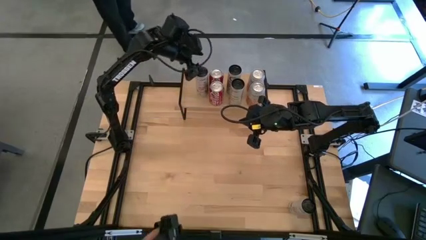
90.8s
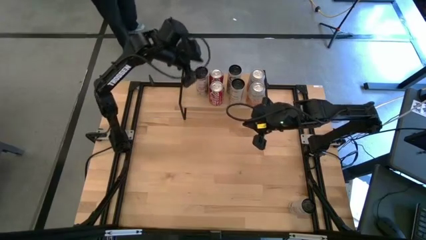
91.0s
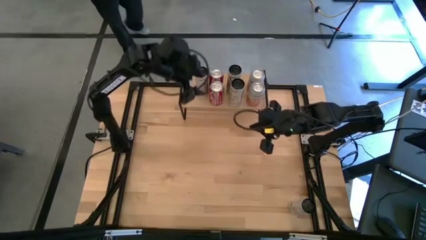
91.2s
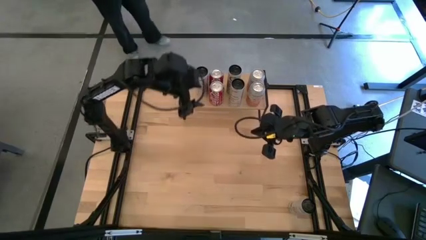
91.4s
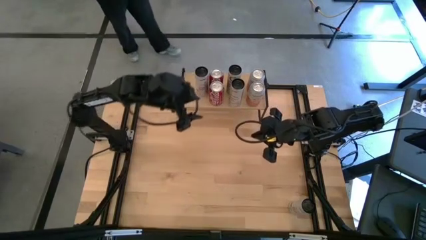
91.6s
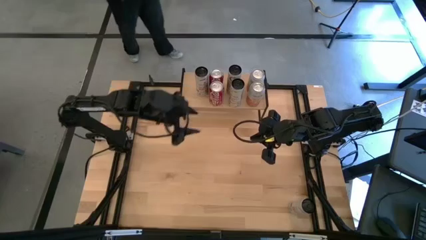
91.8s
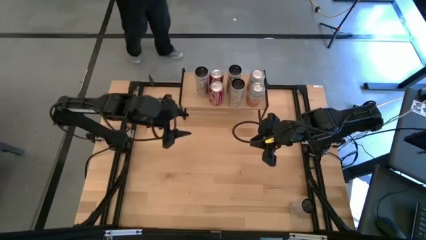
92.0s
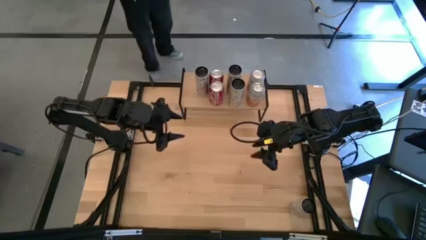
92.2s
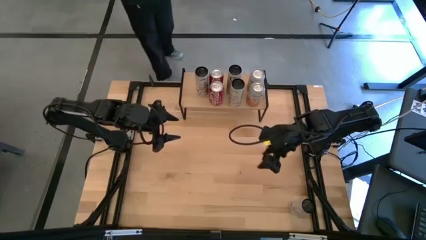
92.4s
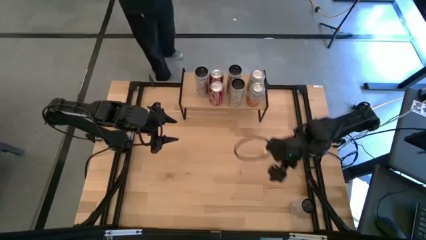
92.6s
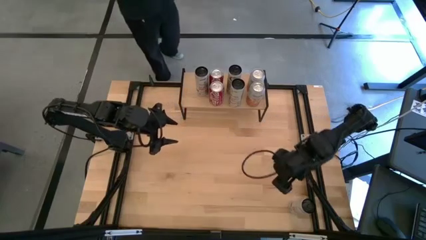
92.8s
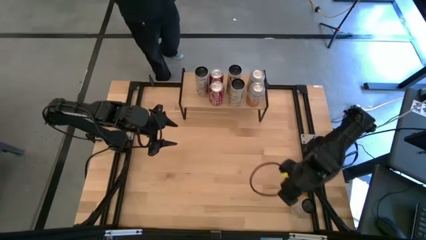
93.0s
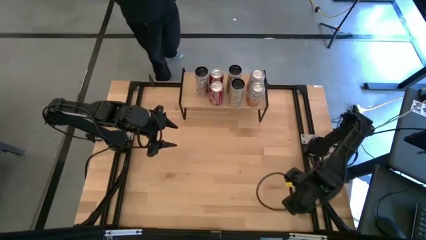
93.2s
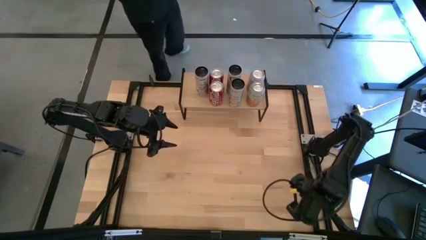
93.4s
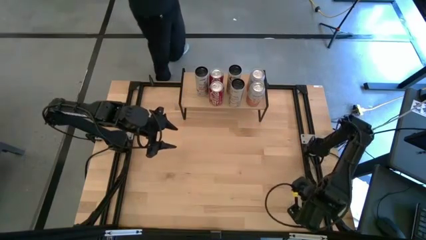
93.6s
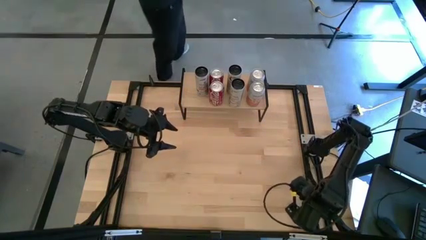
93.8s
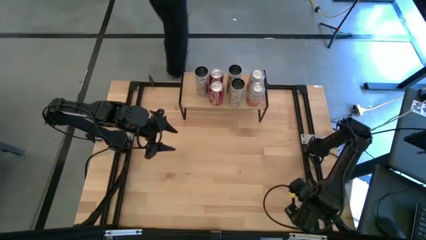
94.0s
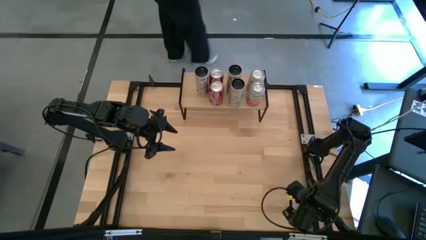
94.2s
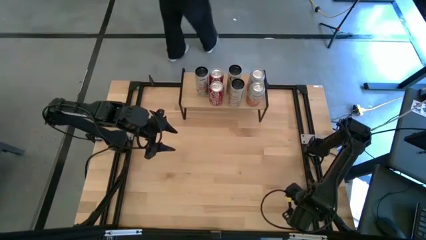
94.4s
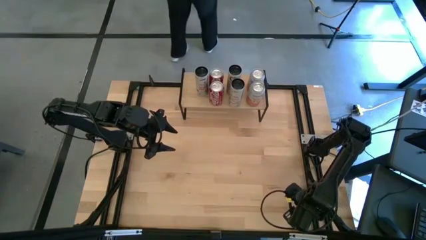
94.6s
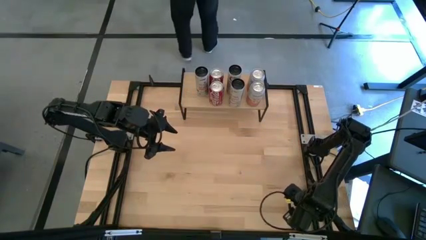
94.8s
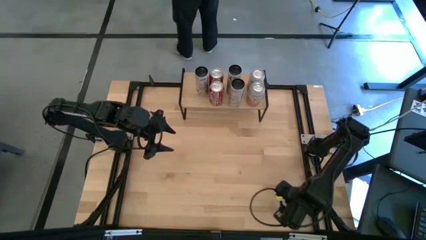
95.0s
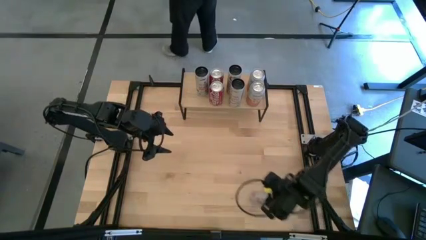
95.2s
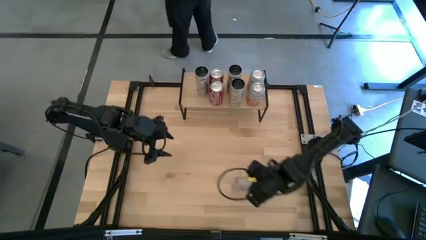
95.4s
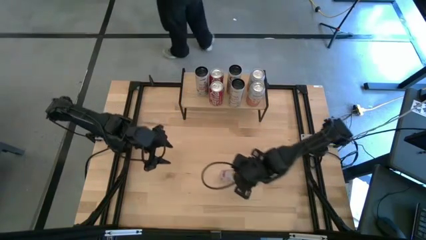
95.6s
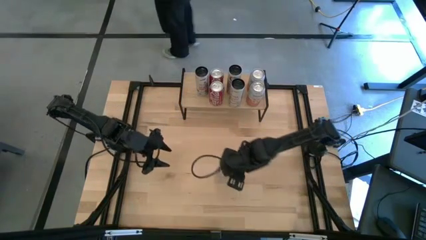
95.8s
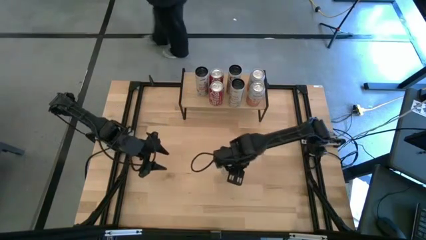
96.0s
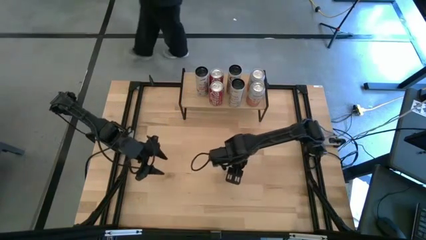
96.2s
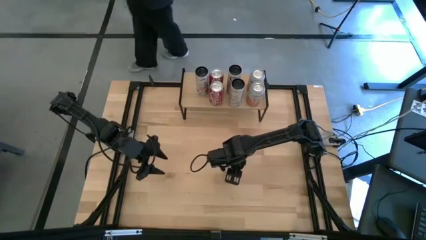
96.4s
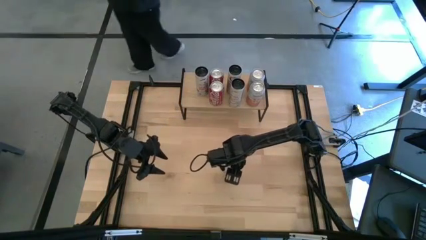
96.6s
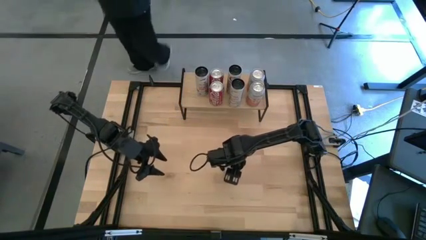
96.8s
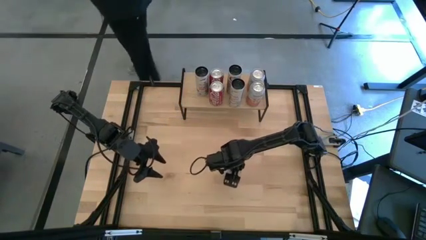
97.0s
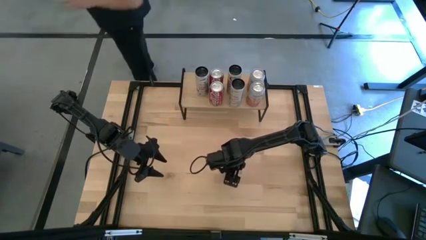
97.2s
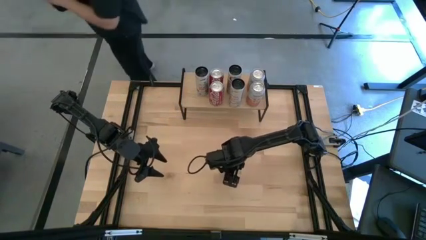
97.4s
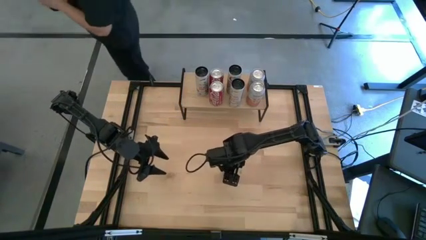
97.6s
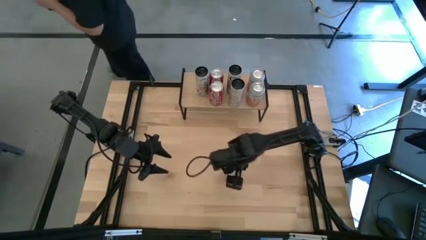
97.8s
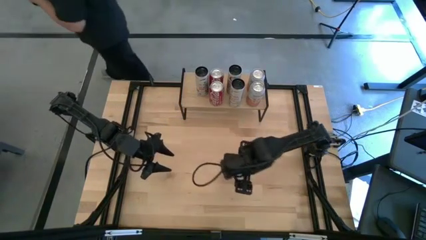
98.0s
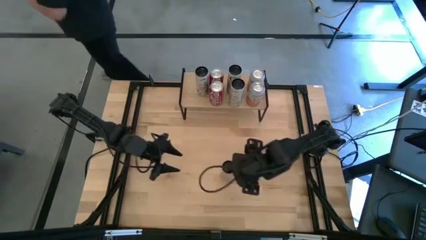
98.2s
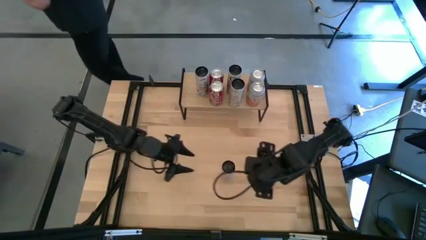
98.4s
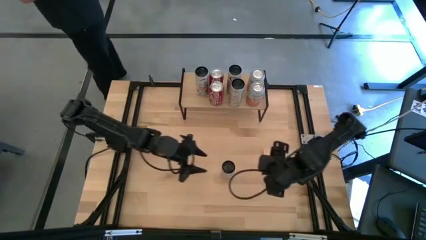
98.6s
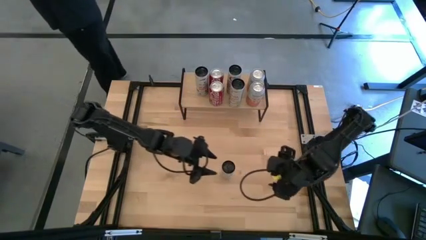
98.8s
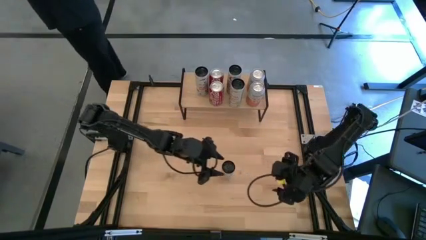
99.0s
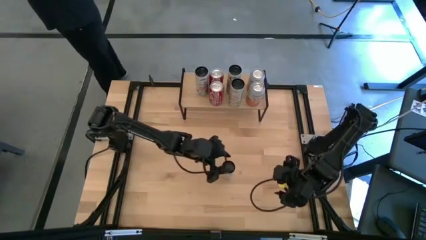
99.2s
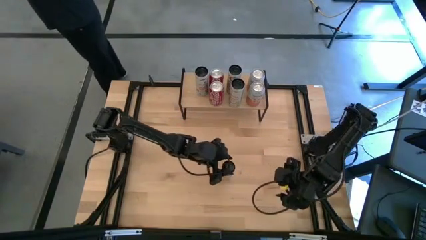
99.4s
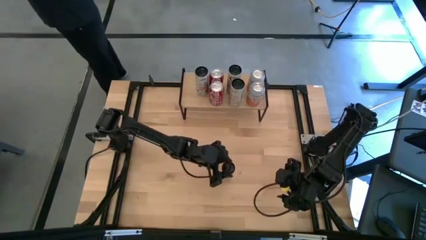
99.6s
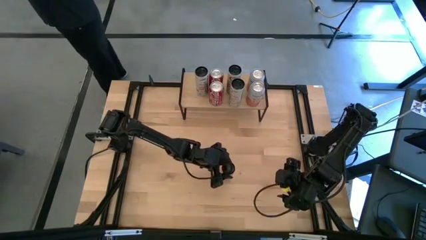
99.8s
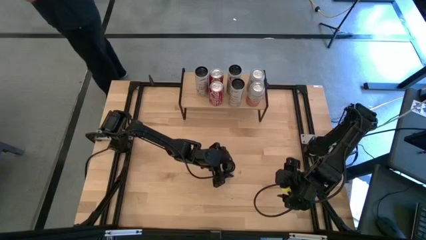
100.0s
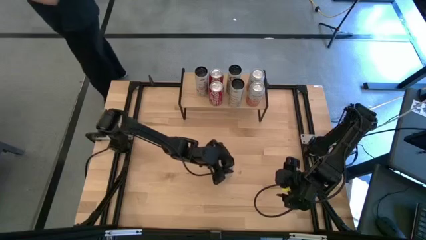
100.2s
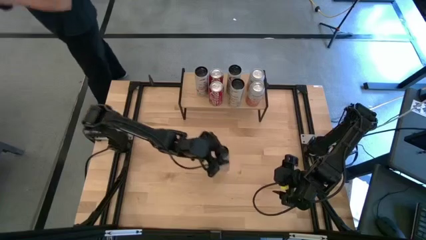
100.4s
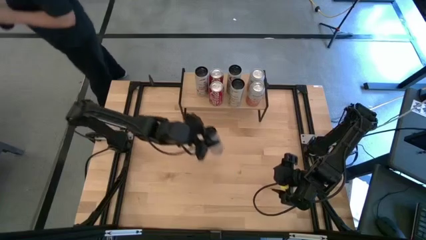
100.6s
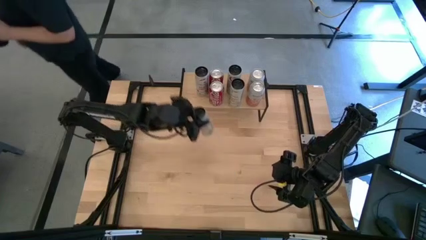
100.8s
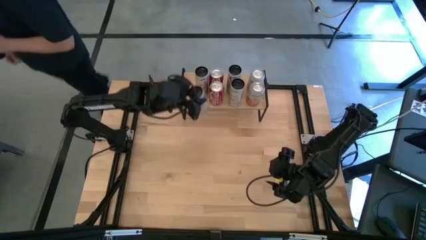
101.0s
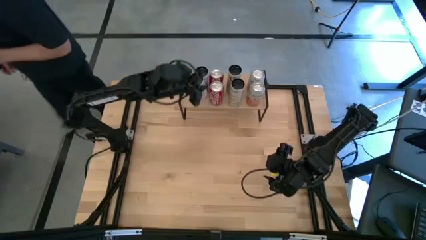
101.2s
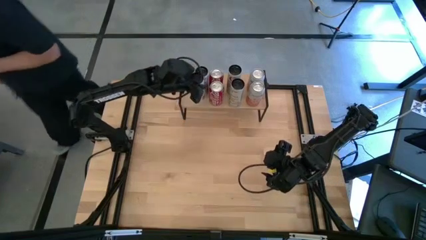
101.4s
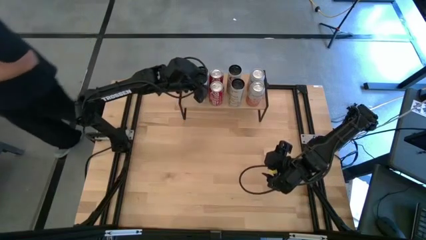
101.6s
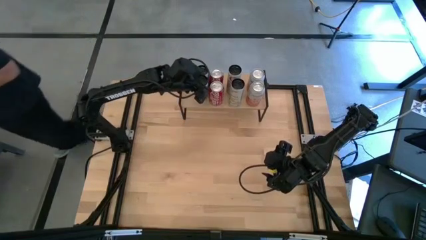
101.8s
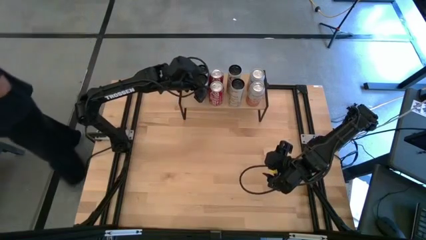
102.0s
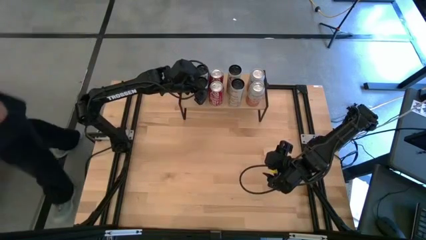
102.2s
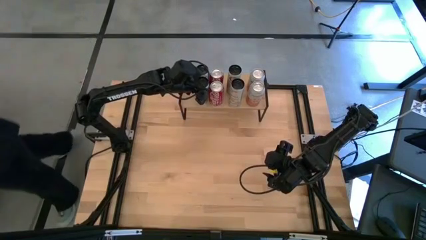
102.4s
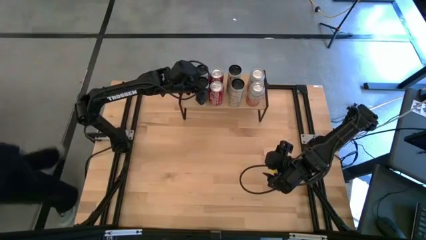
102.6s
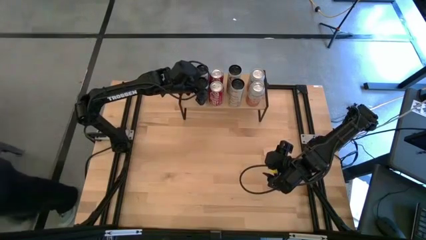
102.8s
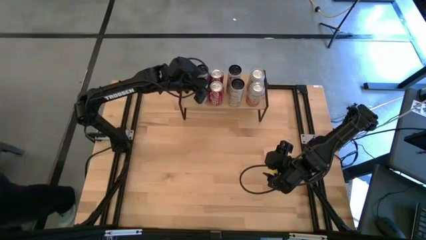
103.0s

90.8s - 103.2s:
Task: Place canned beverage on shelf
Put the white and pink soda can on the shelf

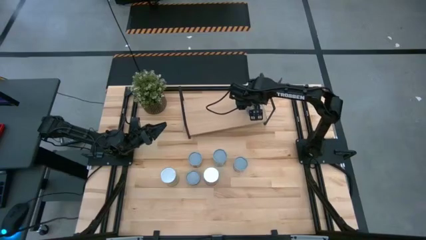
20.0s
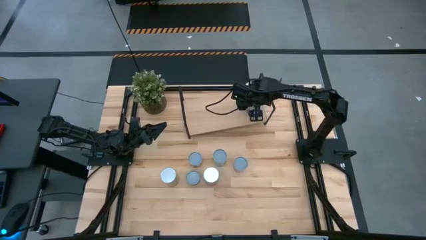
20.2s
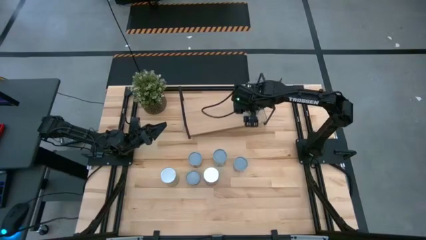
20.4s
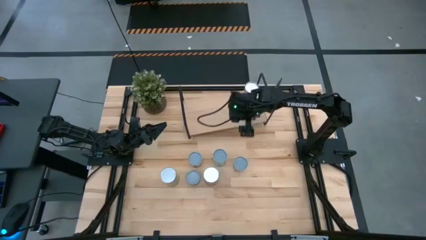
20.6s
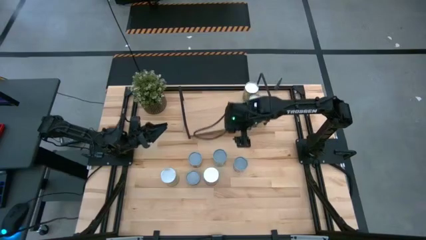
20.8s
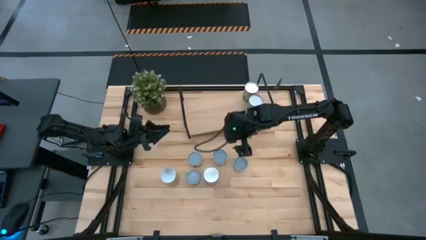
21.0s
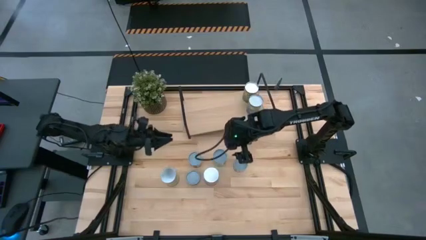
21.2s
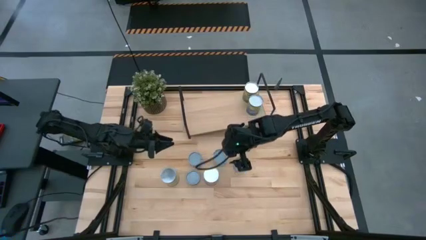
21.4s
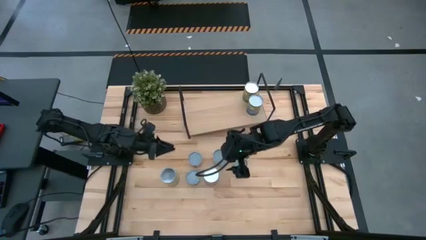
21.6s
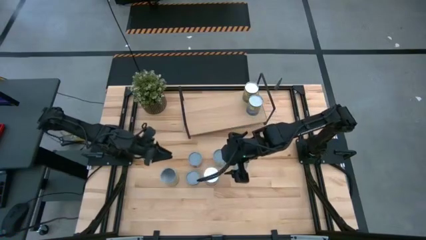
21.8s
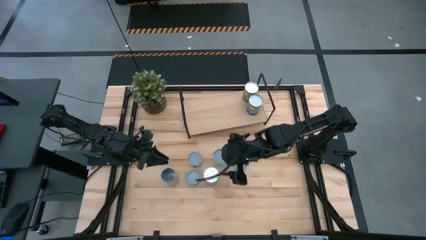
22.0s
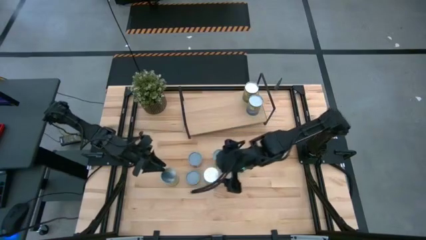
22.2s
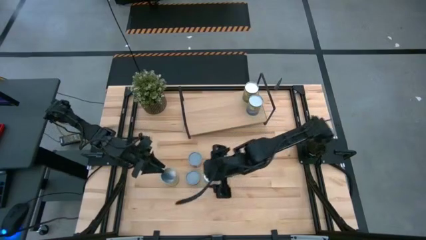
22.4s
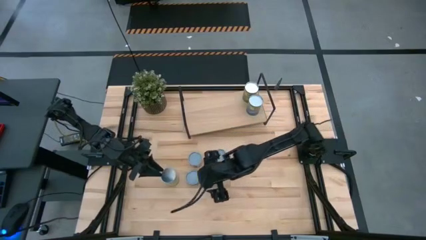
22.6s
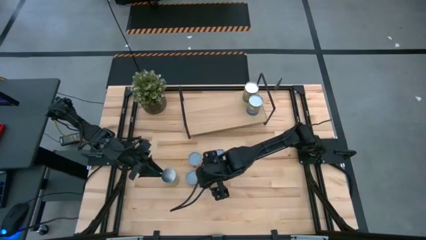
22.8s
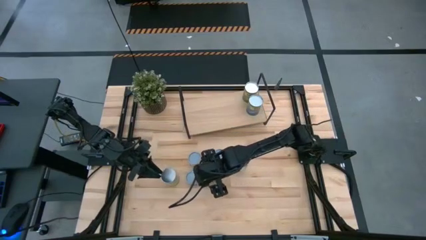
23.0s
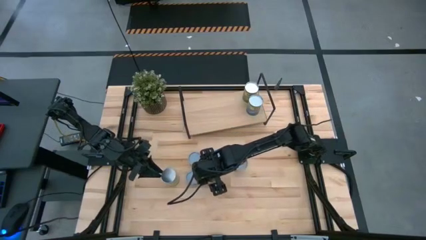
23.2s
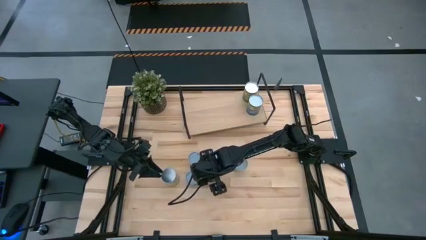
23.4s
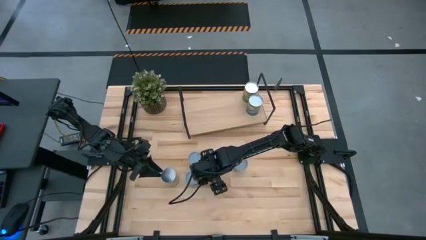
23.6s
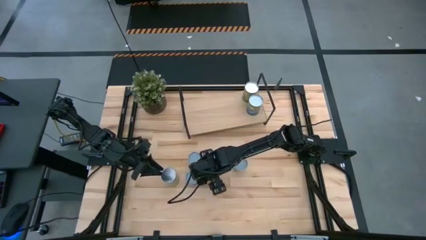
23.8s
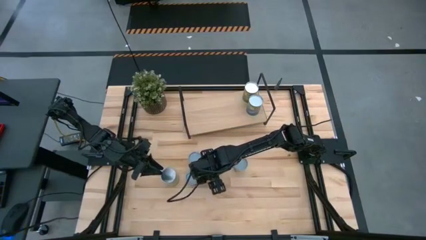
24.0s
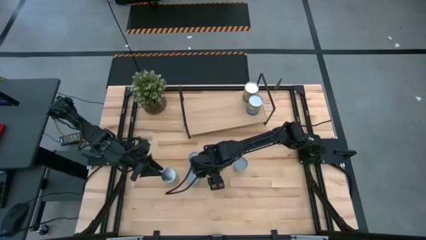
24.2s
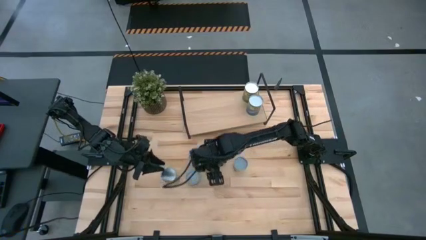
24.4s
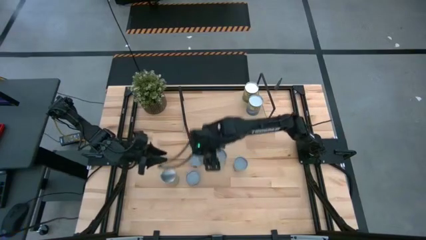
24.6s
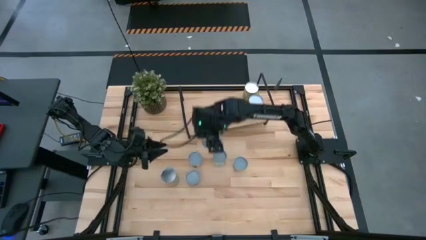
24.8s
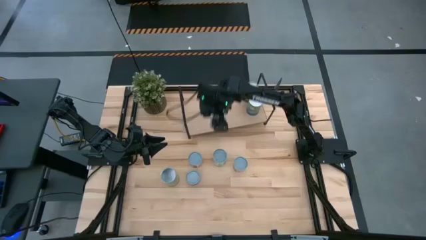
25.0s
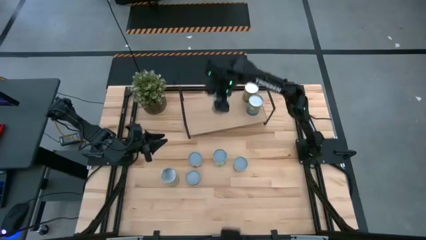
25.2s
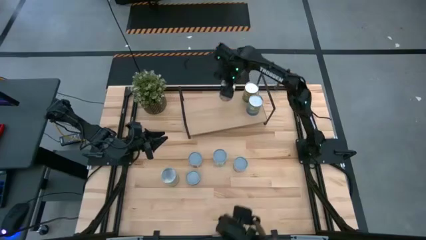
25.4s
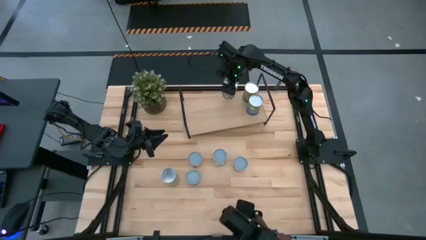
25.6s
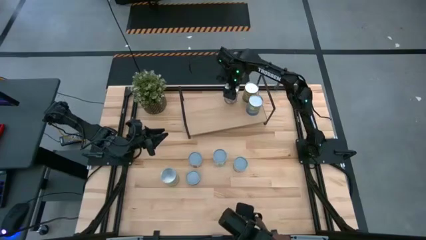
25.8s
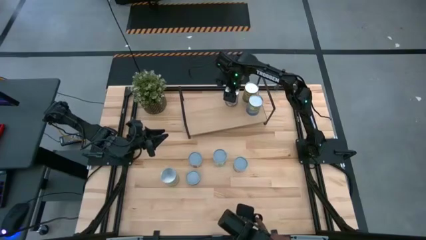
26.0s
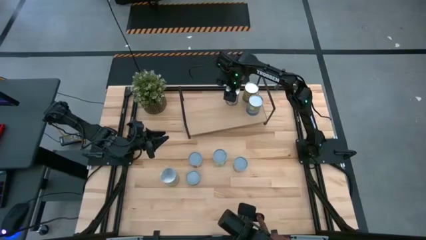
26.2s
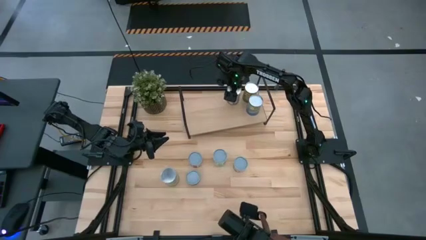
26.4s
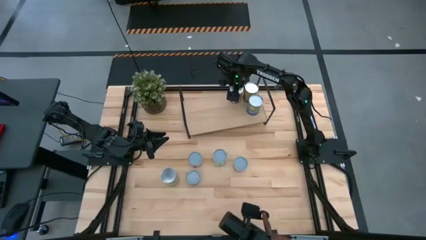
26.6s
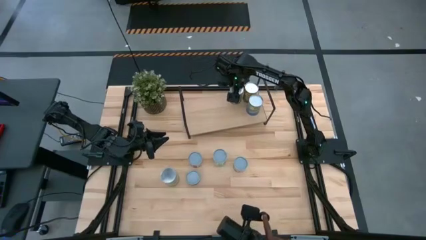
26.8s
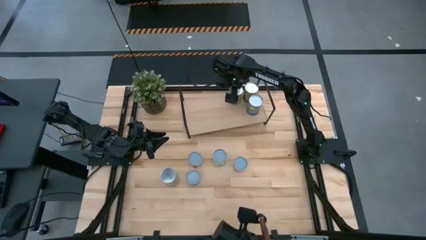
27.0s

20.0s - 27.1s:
Task: Pick and place cans onto a shelf
Put the canned peaches can on the shelf
